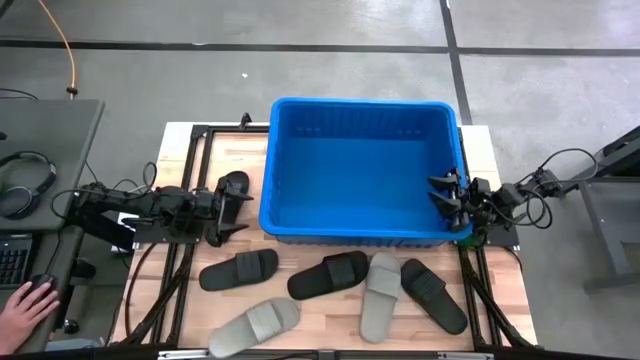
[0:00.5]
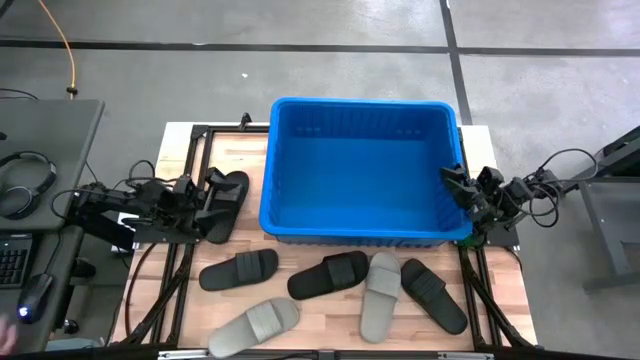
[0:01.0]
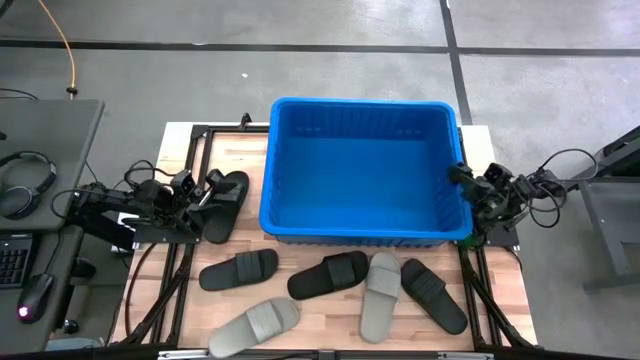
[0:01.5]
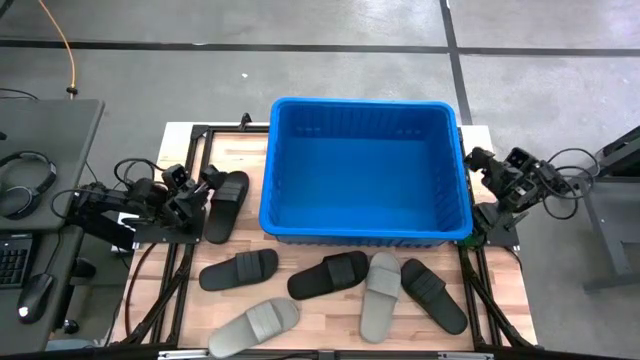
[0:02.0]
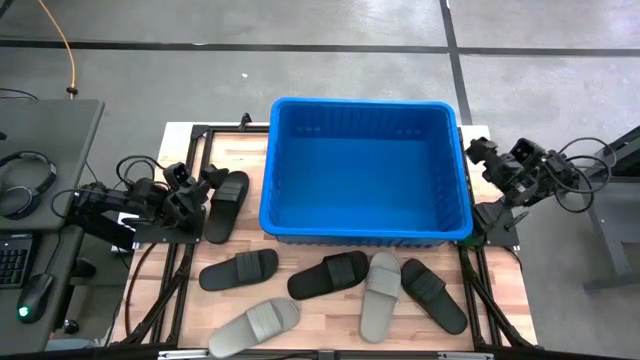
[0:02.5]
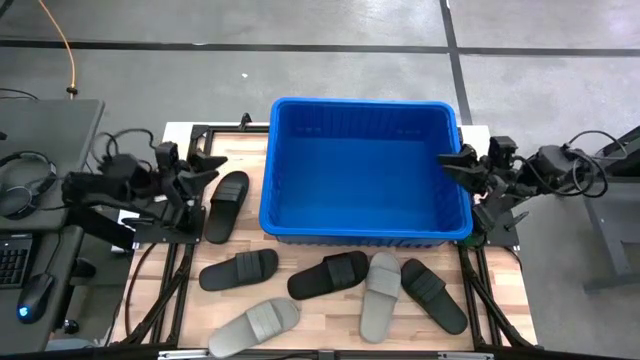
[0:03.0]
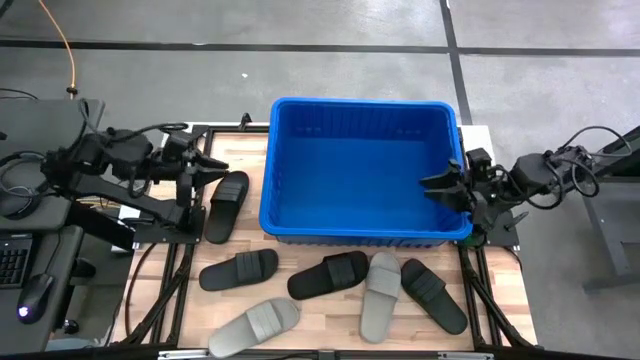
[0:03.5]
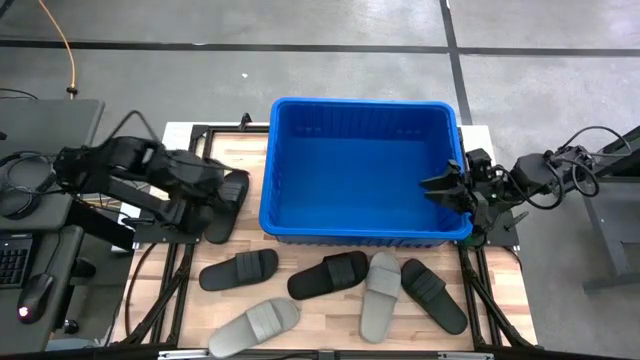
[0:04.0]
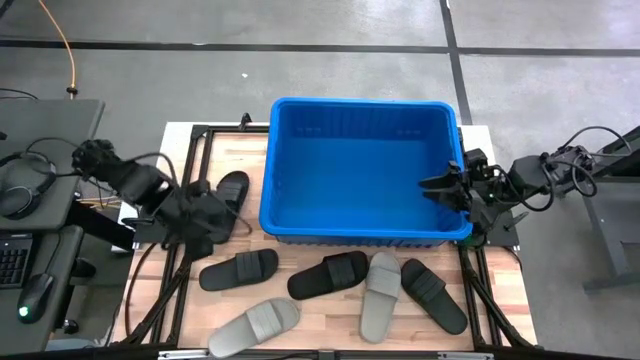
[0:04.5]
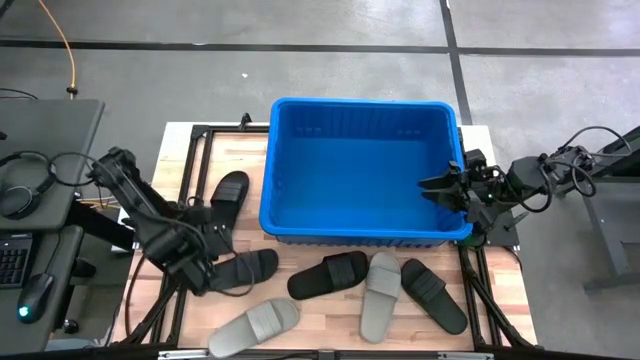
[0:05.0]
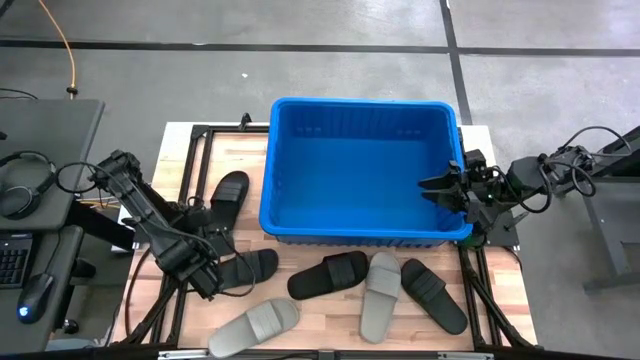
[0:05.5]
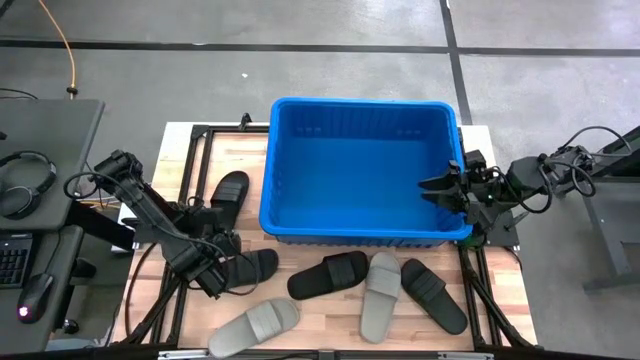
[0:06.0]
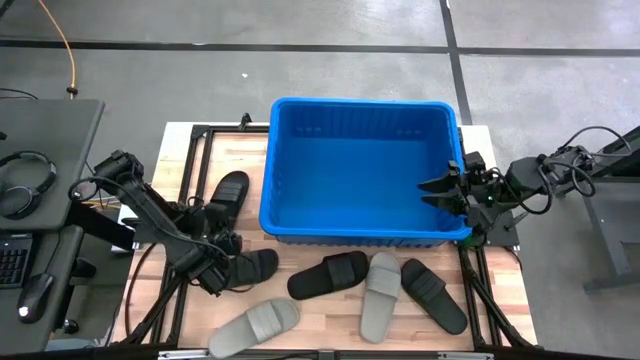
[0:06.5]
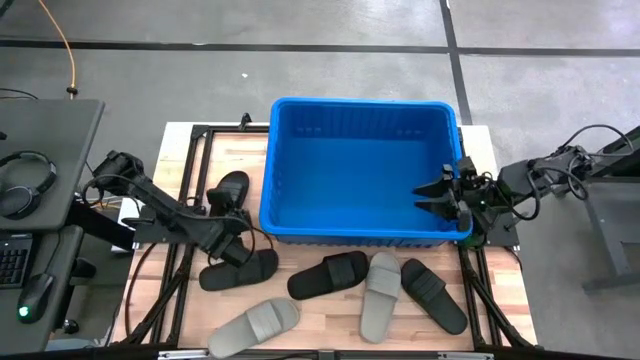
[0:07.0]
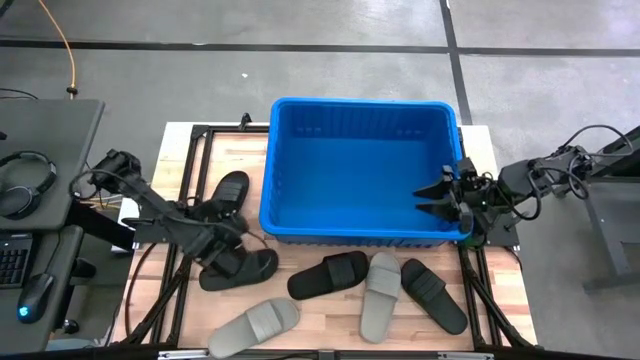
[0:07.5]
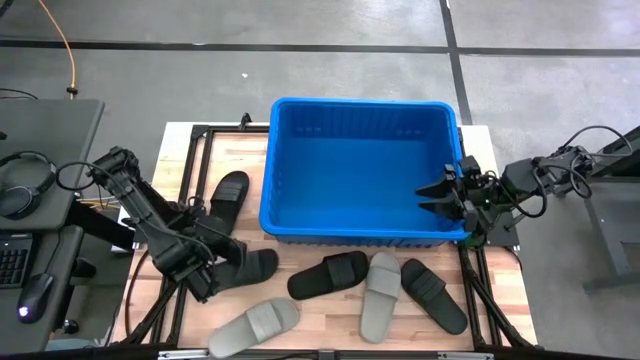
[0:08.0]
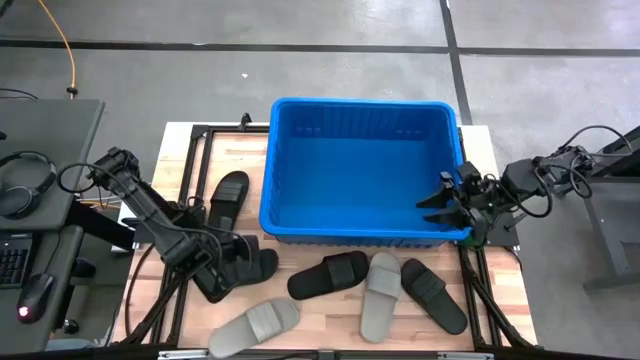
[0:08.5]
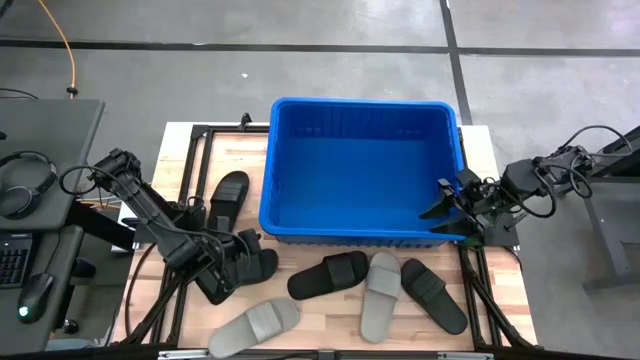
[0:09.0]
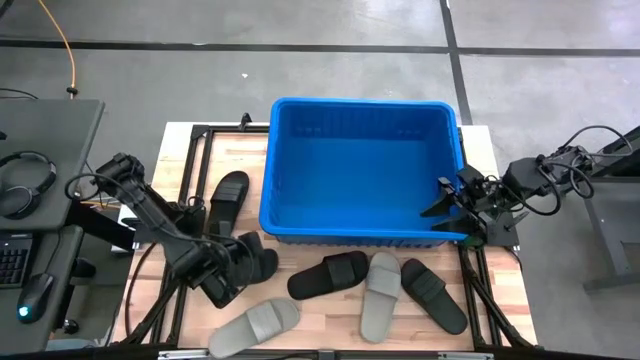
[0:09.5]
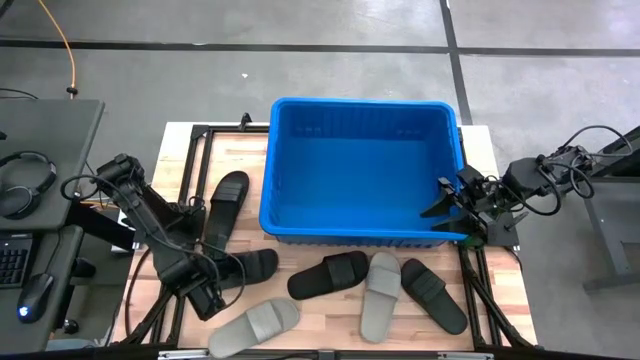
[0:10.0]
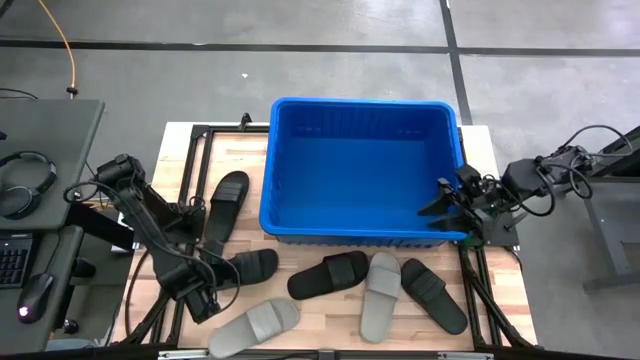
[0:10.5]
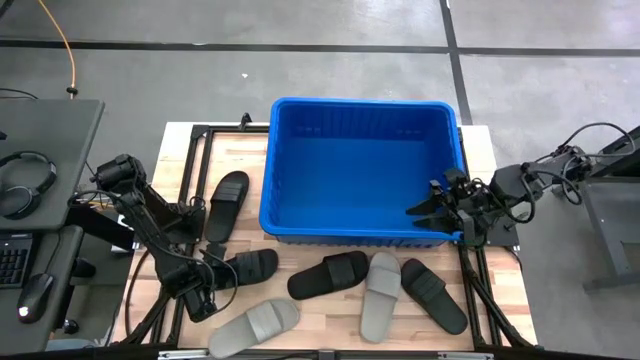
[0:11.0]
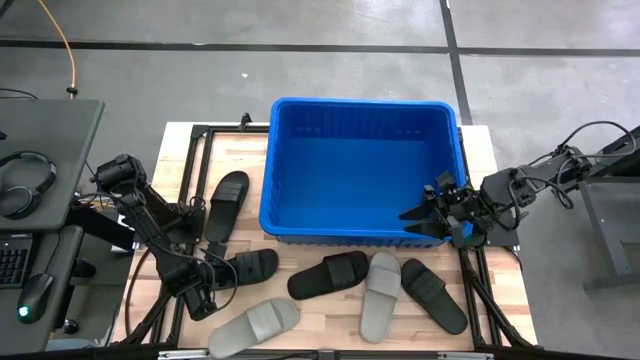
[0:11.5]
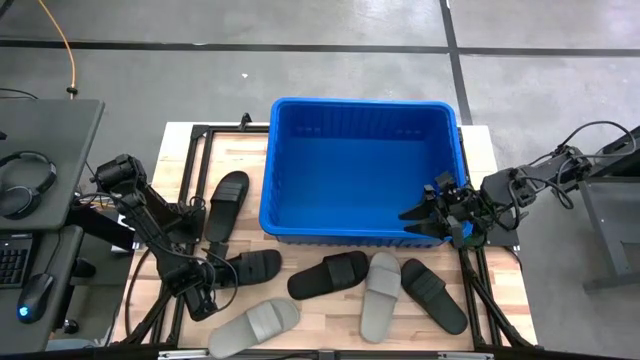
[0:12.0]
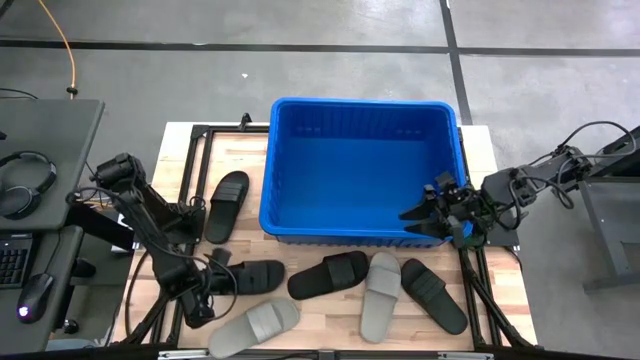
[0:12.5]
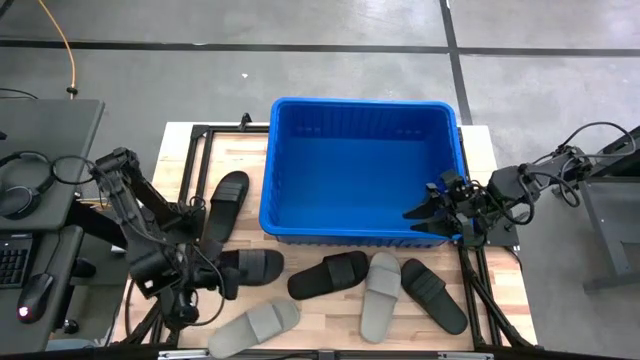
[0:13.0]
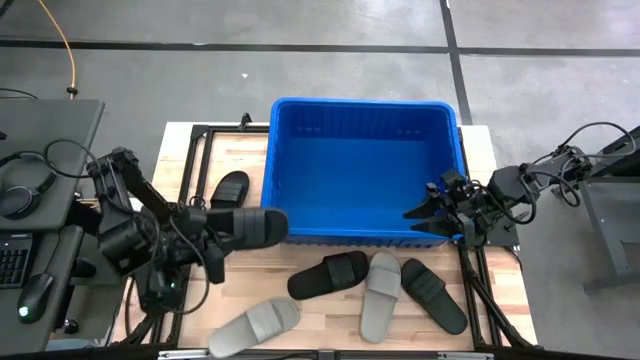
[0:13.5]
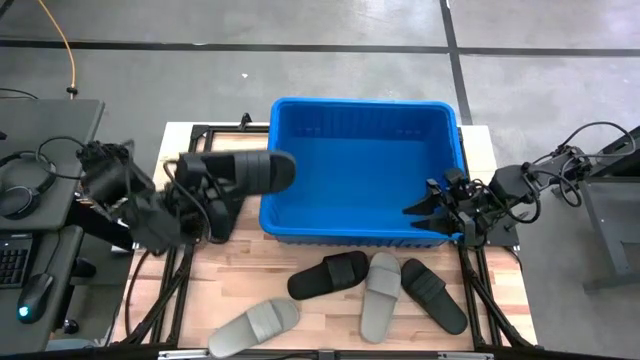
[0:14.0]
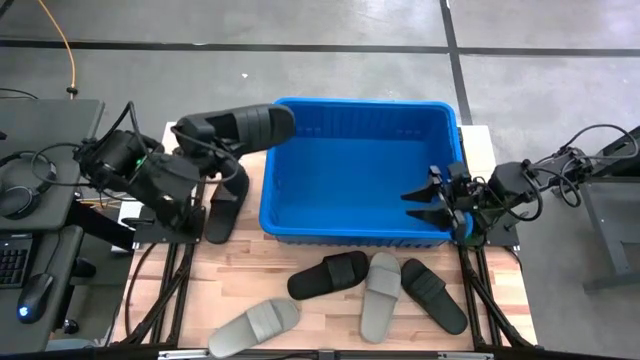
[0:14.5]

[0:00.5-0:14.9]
Task: Pick and place slides into bin
Put the black slides into the blue bin
